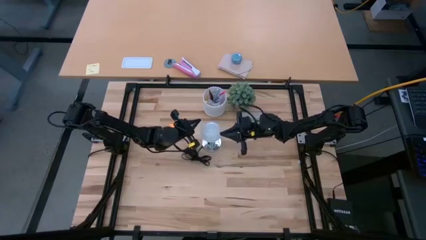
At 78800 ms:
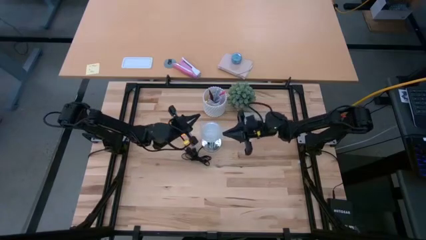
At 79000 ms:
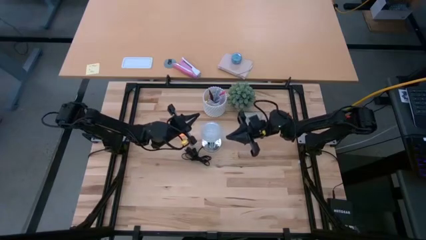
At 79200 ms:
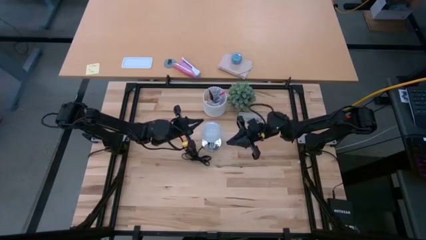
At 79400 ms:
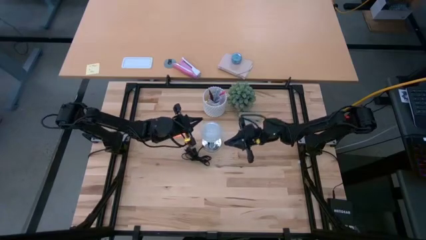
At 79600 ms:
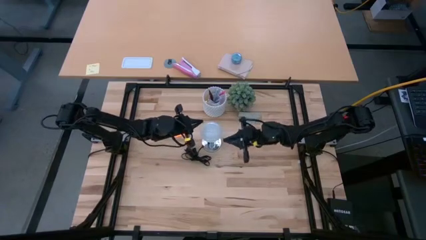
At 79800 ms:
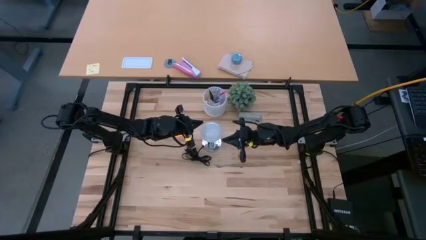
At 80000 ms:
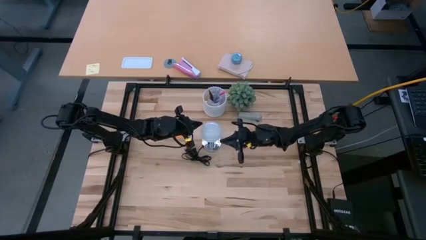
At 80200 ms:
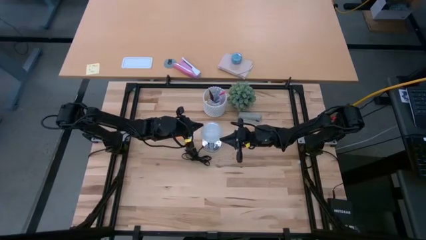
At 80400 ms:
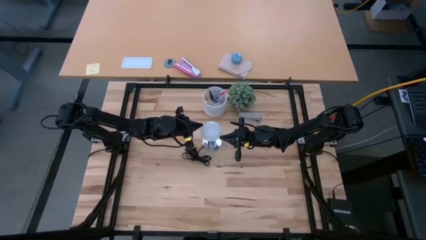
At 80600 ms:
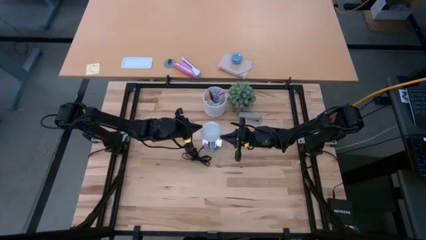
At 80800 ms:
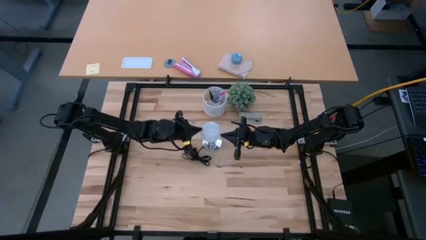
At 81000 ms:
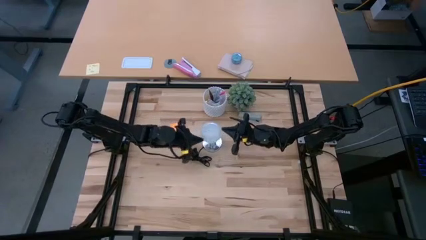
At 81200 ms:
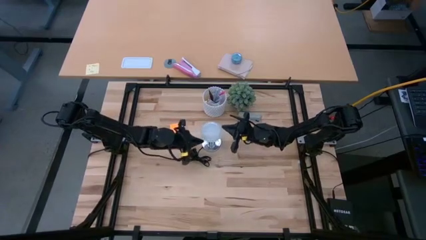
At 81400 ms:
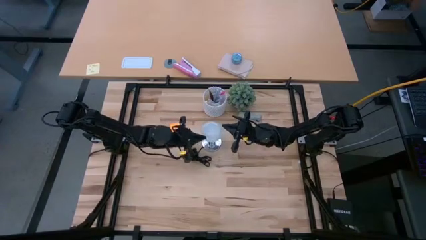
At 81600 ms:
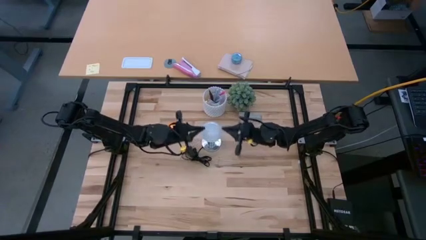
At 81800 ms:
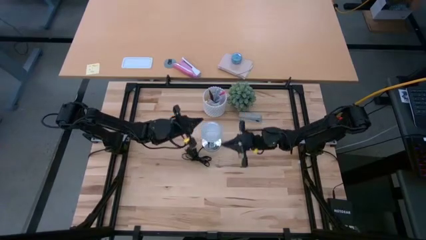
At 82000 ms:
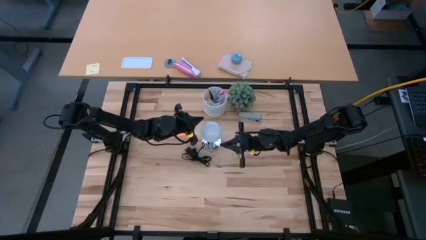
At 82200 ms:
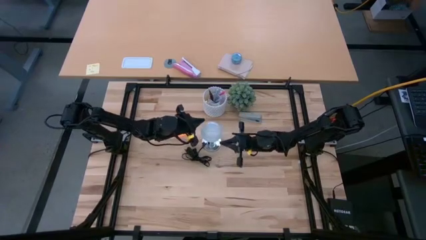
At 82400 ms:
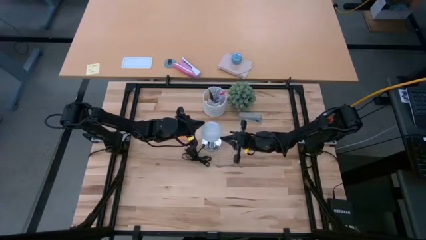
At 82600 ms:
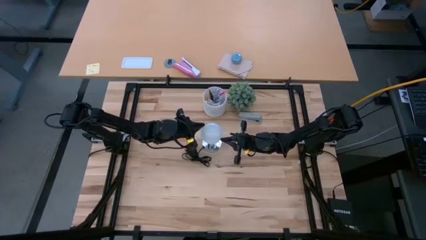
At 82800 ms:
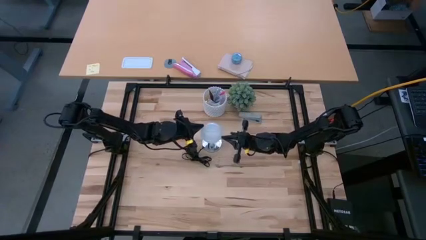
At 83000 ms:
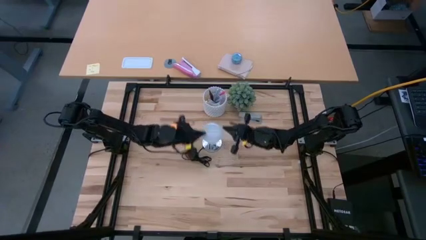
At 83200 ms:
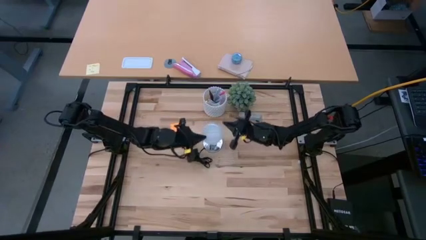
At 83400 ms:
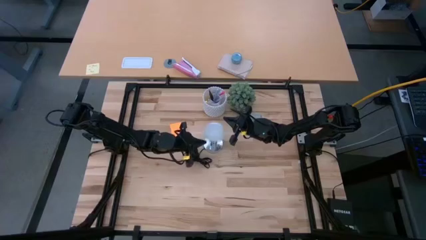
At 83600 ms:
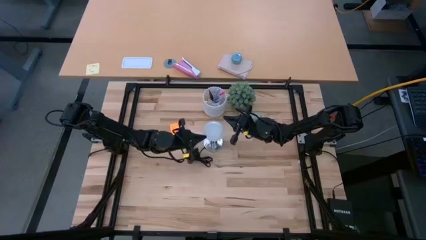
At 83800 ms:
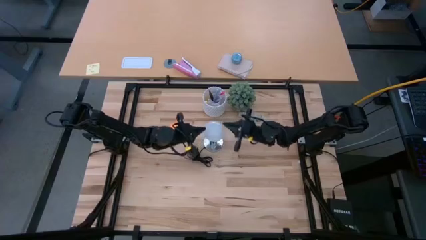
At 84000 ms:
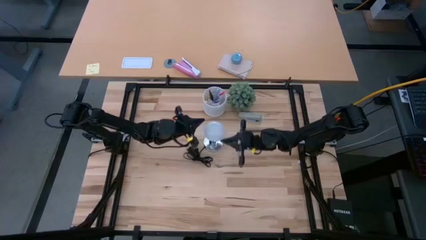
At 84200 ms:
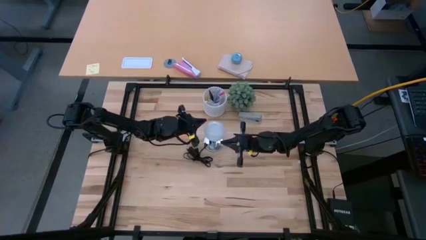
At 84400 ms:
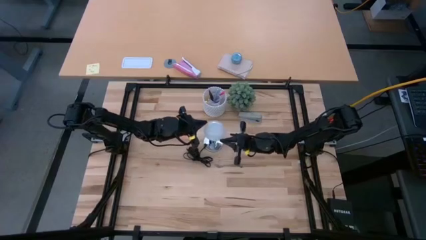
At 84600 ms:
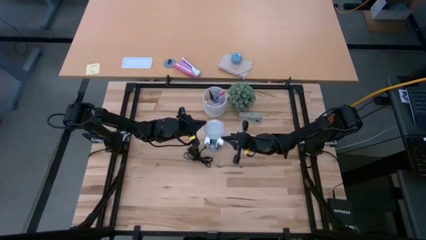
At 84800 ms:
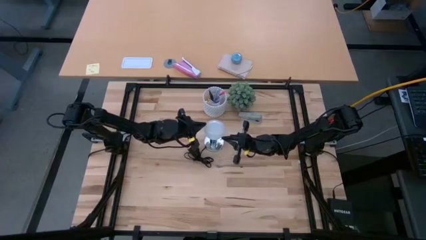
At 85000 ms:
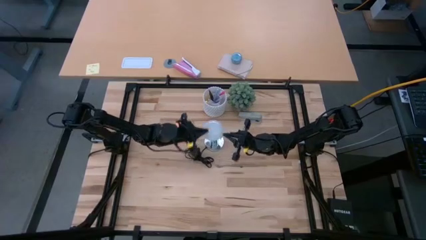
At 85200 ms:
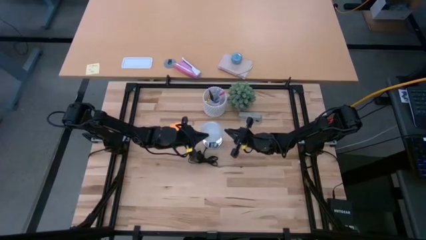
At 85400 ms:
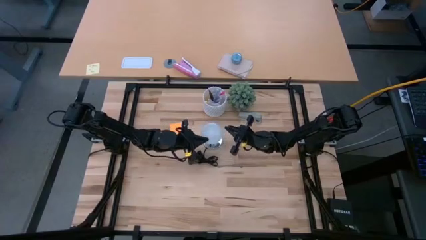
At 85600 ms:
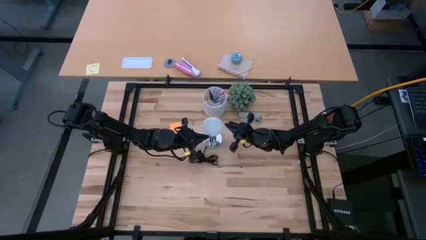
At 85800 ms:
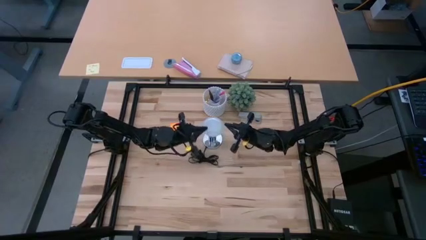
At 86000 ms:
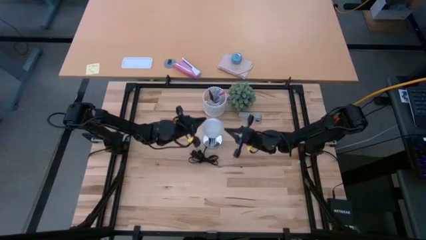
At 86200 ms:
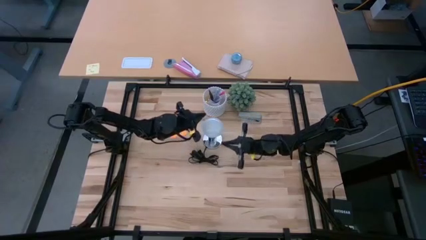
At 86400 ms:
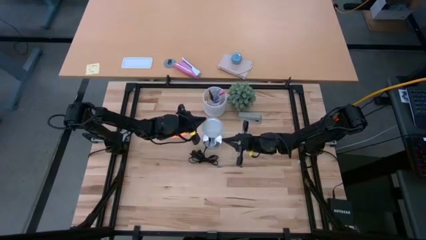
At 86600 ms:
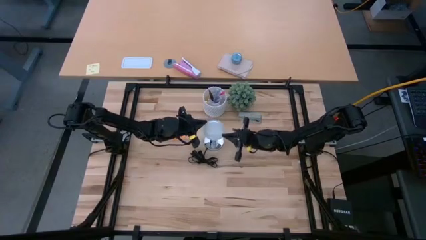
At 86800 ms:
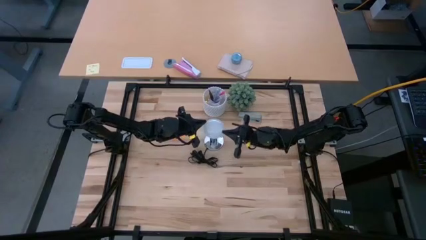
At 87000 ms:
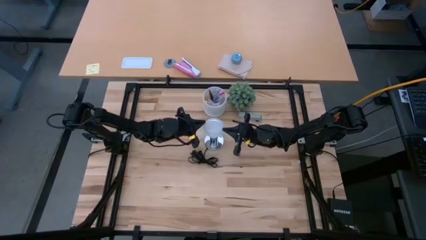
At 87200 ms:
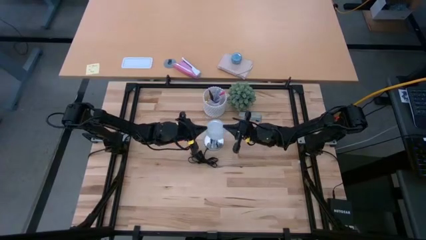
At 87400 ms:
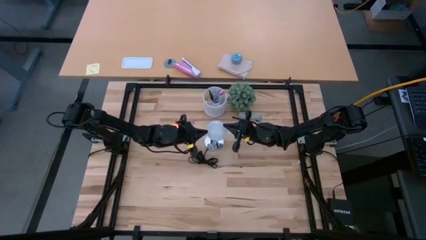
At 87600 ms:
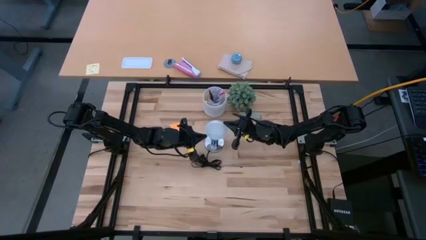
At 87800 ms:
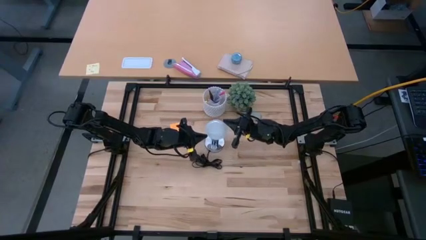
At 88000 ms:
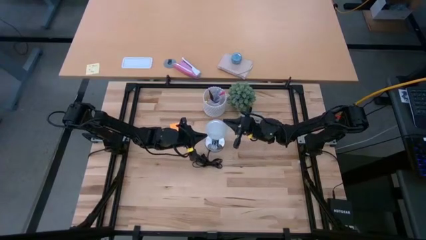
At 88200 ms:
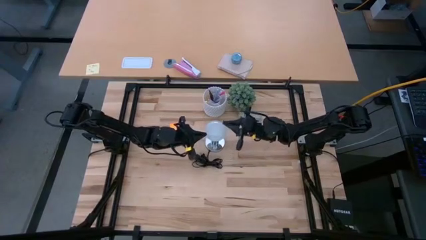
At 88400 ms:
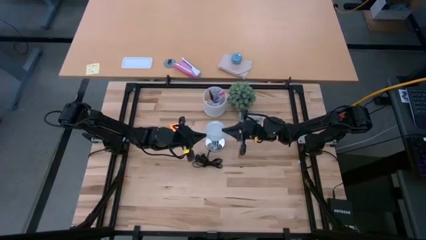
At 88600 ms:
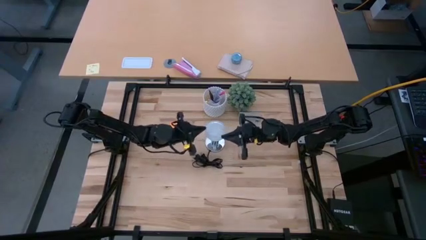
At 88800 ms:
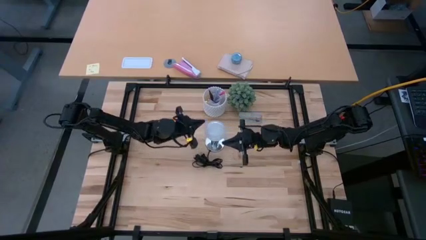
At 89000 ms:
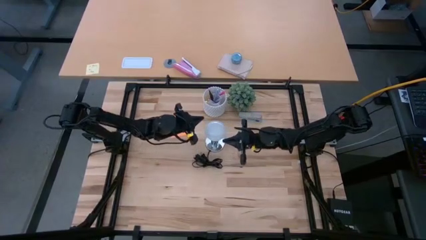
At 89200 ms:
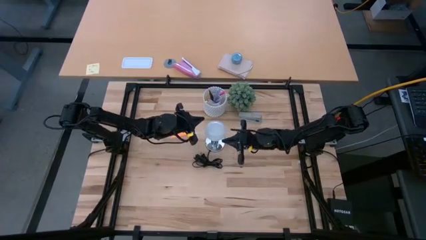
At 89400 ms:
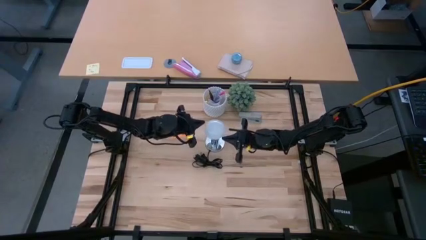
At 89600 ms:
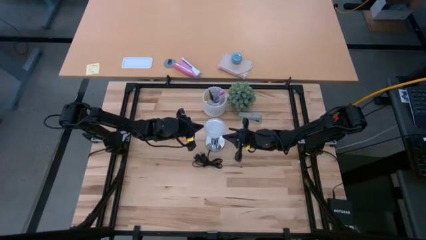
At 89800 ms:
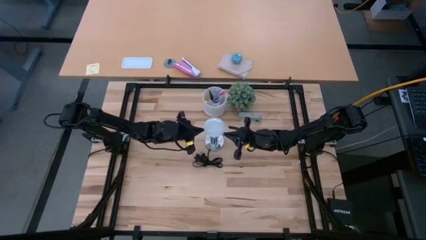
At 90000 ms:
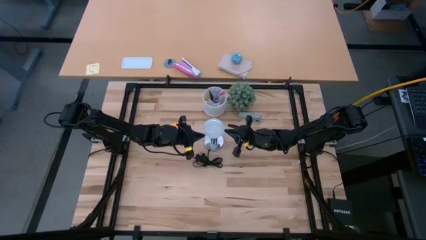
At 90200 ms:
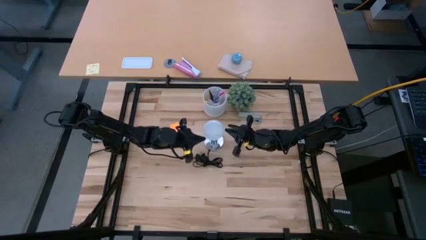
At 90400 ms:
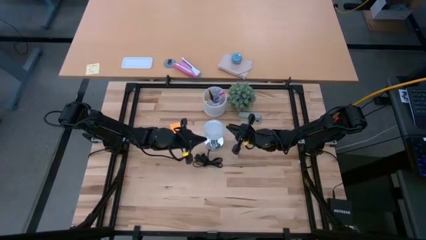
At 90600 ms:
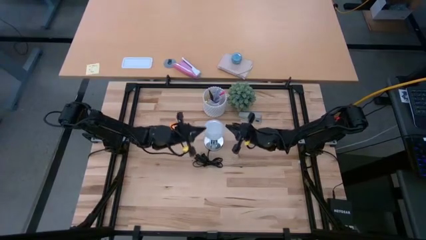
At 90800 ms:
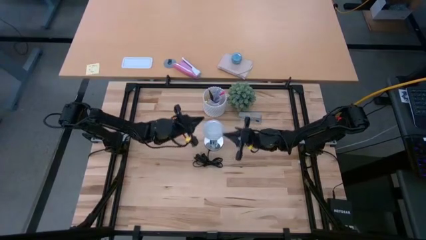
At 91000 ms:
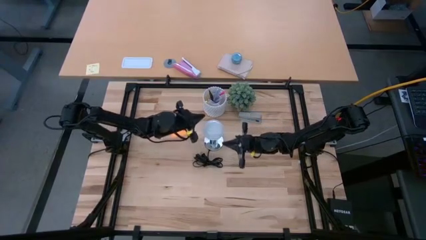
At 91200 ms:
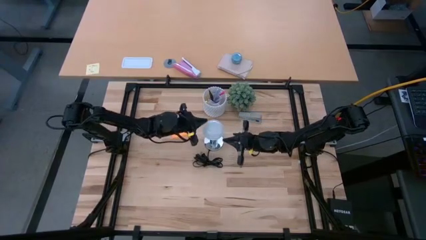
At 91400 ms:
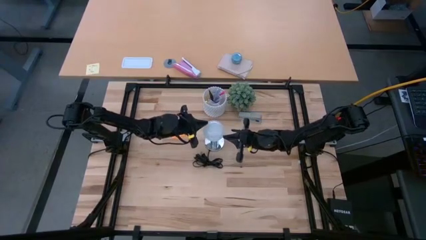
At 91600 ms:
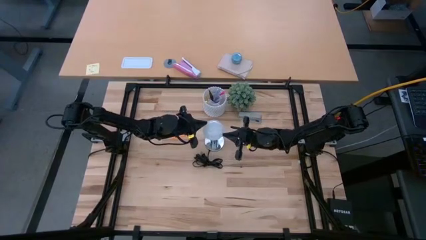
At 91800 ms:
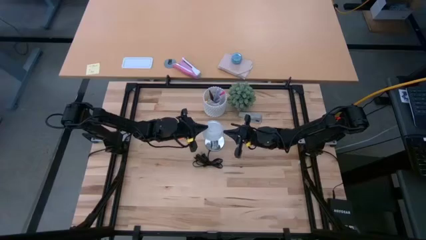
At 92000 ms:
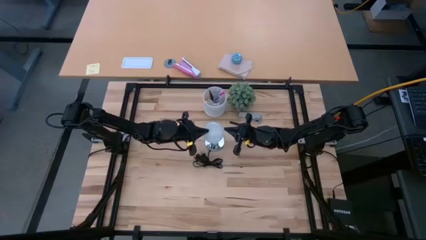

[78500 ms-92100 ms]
Task: Screw lightbulb
Remove the light bulb from the lamp socket
